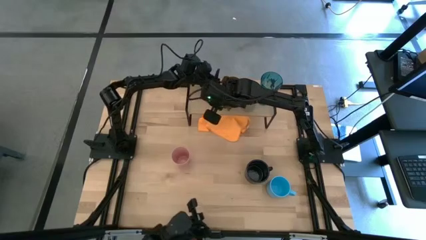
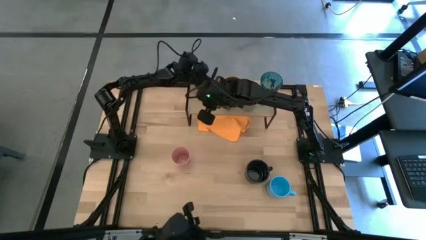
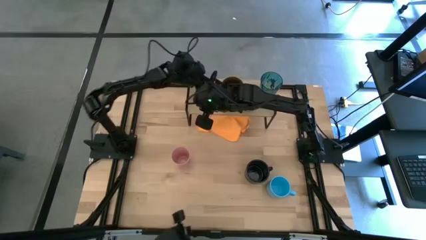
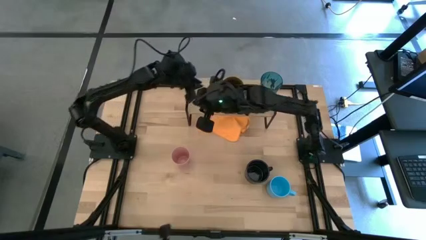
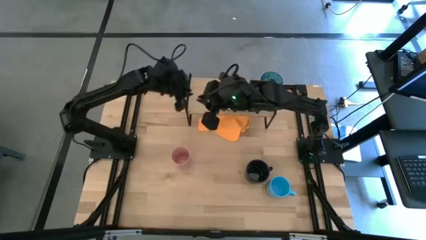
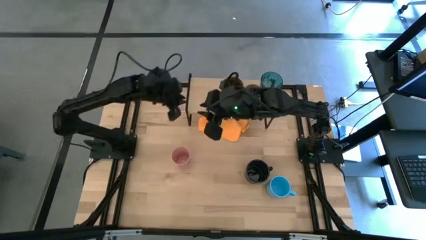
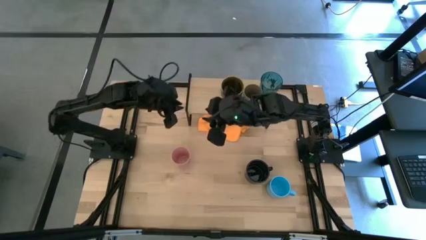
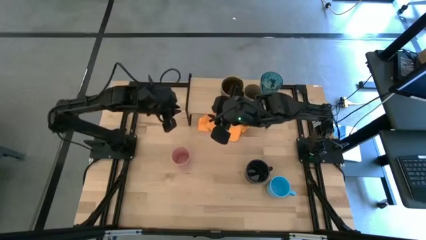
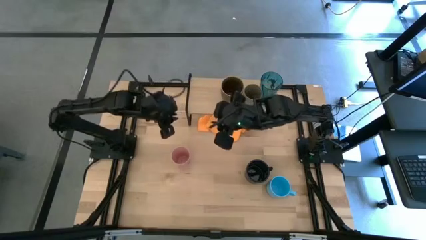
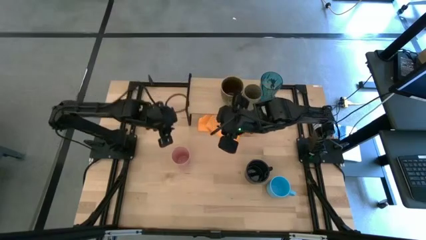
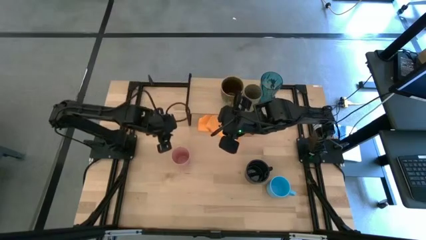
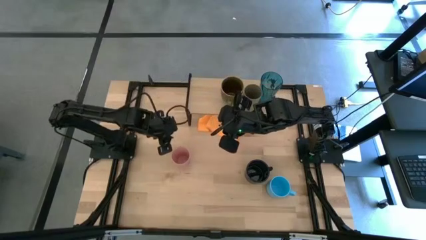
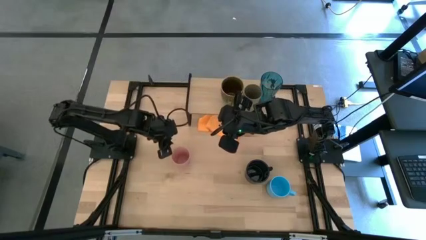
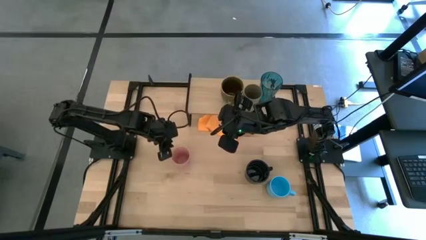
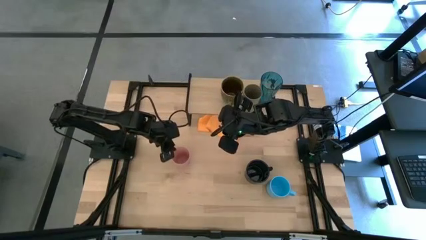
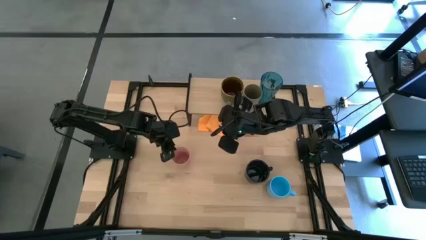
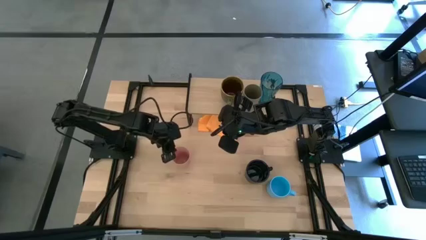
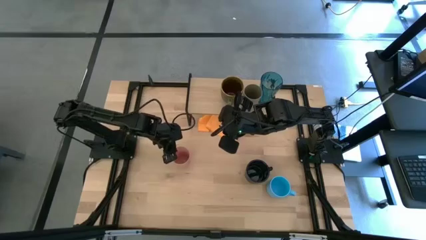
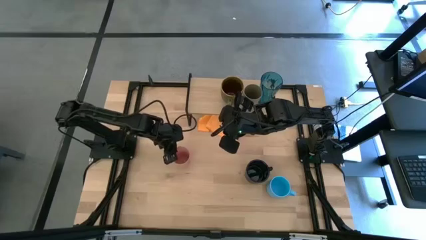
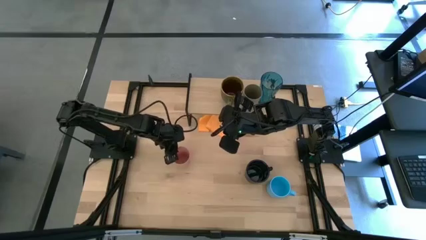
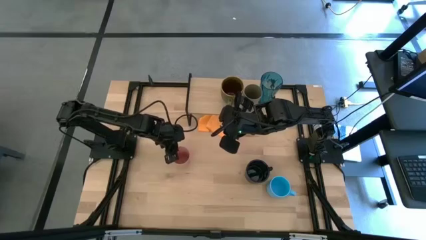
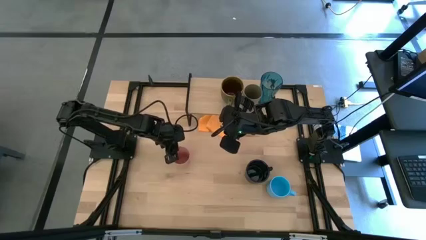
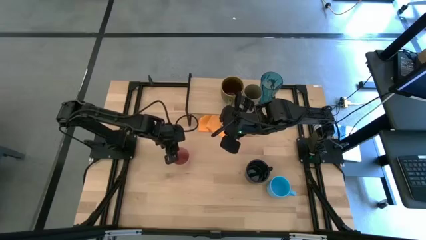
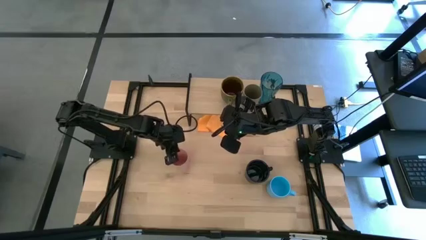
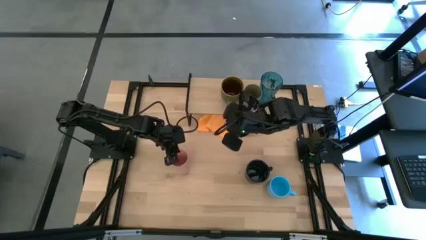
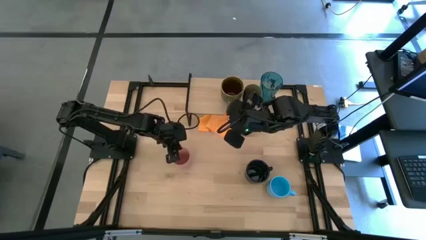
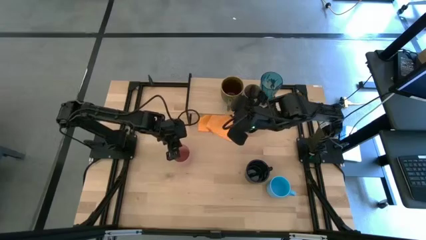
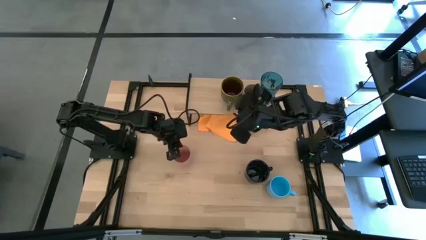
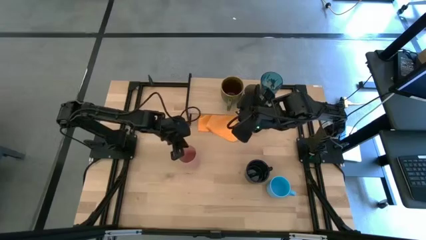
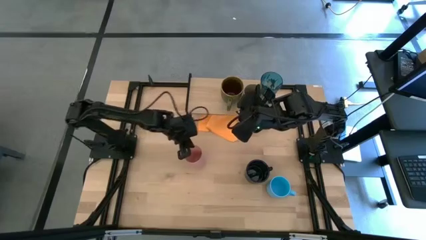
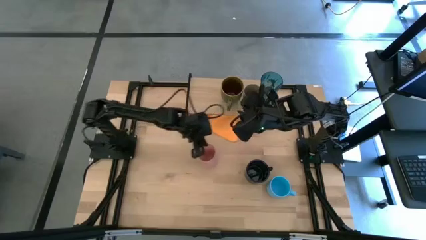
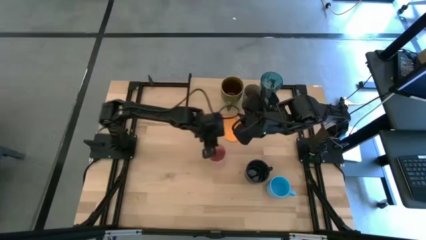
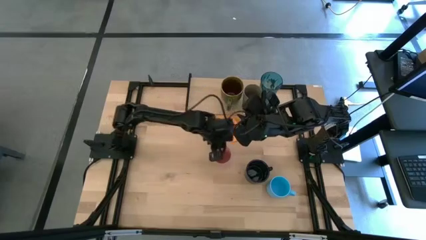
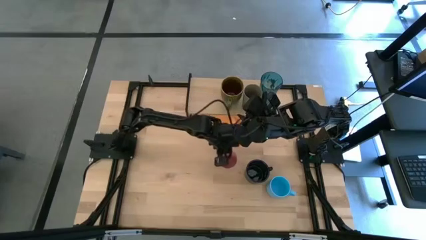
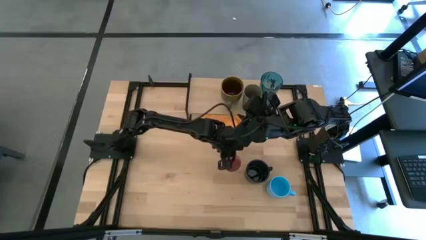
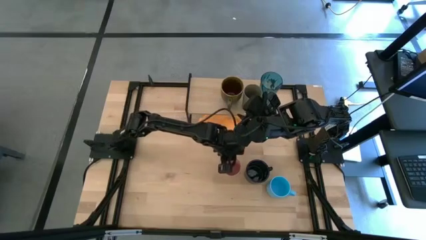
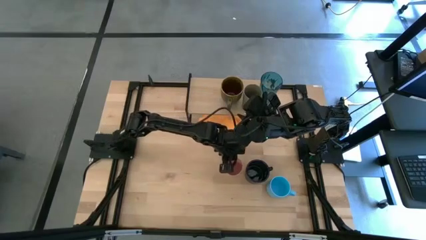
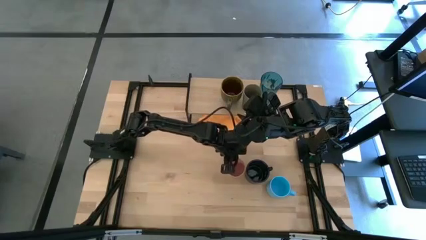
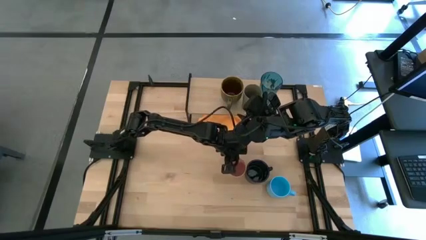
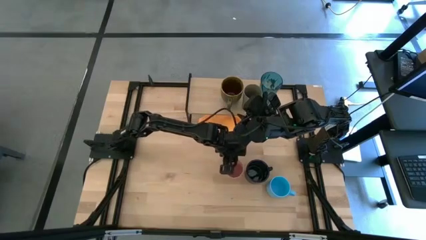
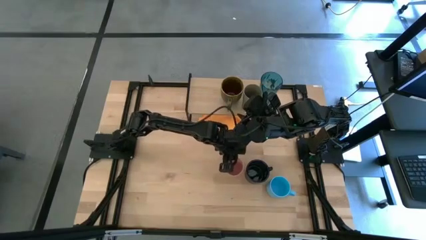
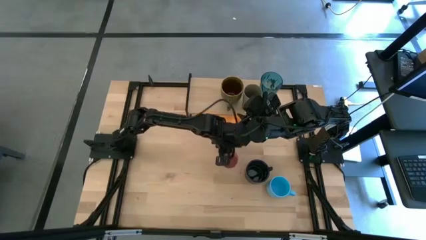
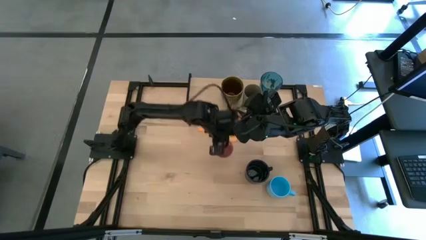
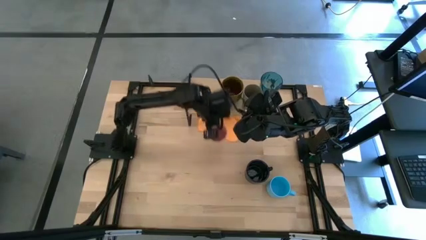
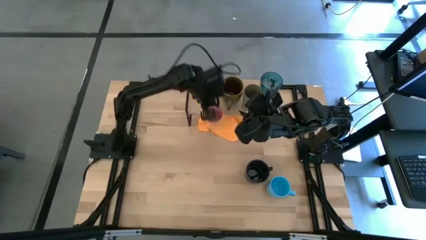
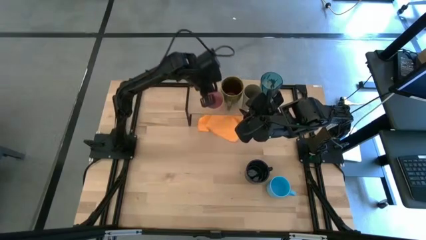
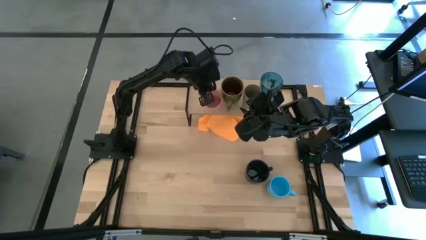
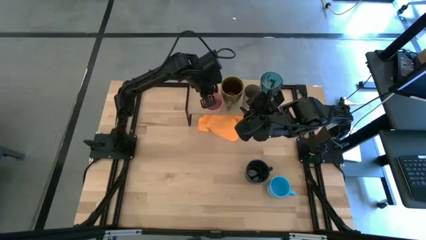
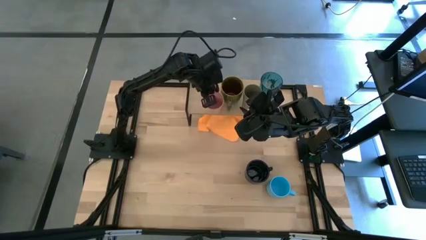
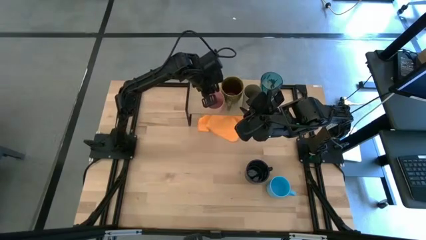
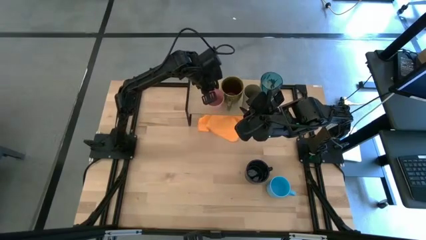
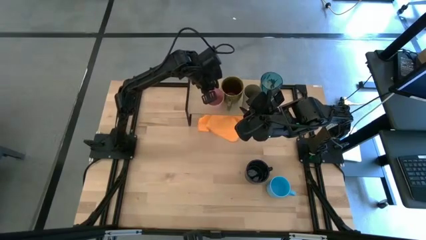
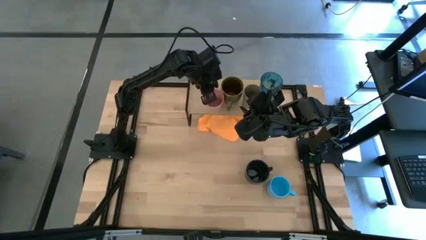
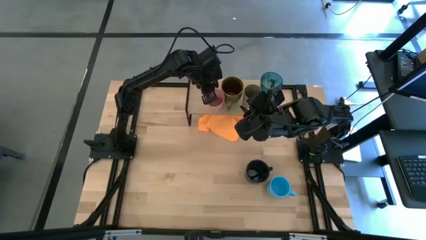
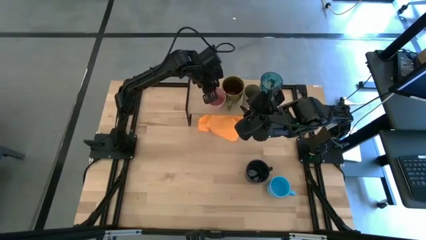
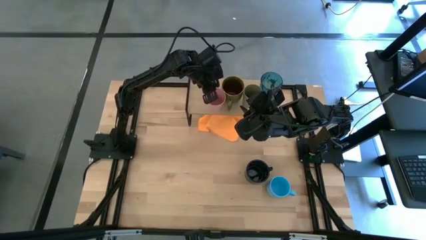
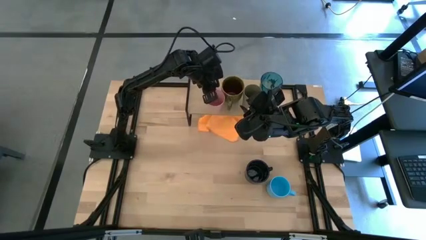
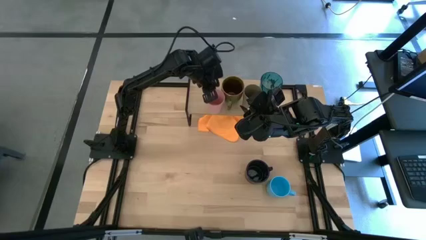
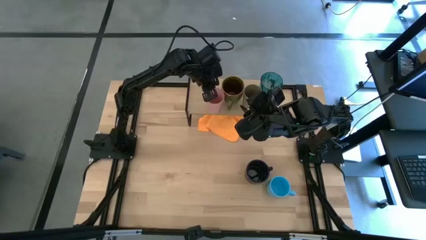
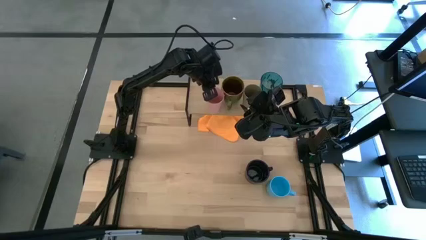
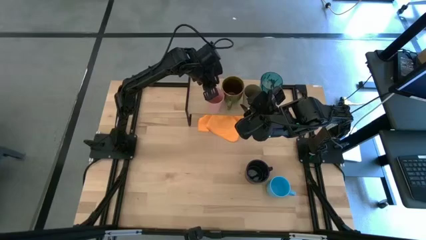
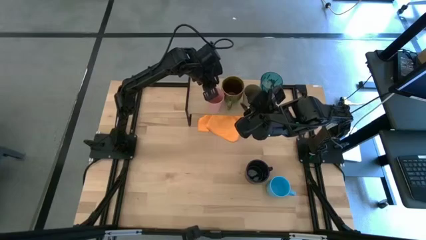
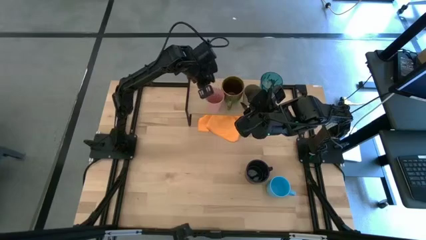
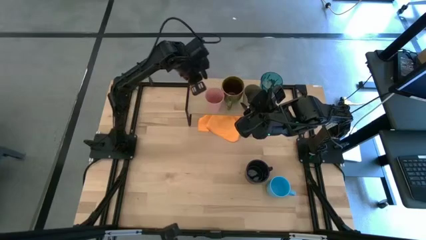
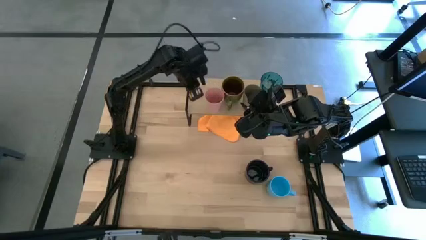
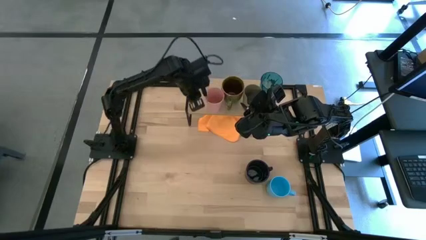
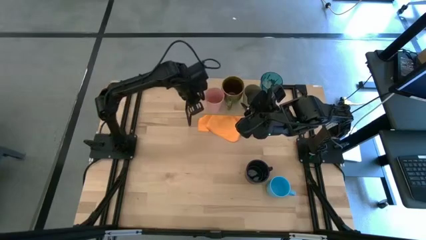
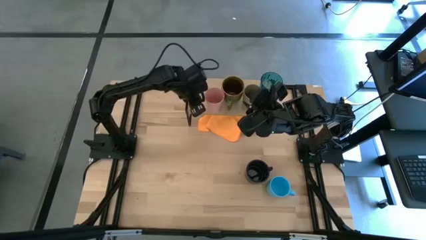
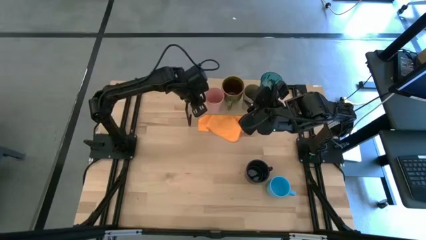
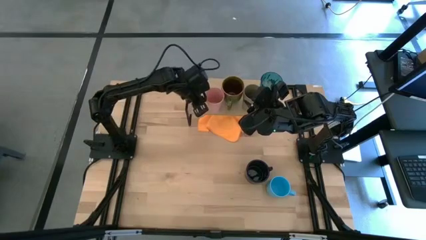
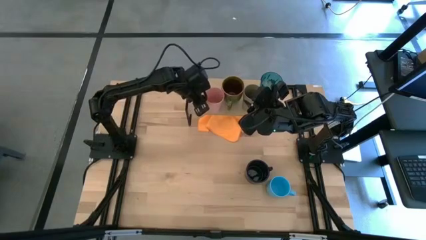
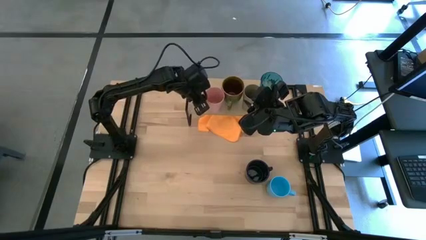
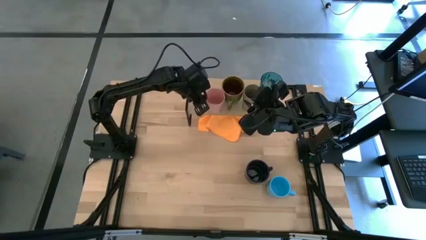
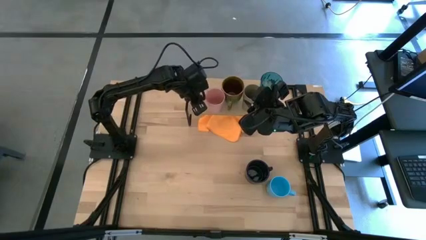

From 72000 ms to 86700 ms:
Task: Stack small to large cups/mugs on shelf
Put the pink cup on the shelf

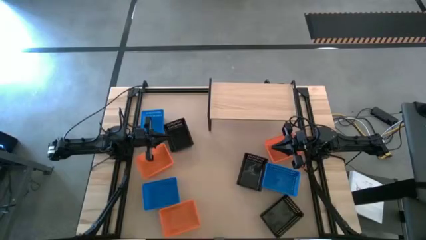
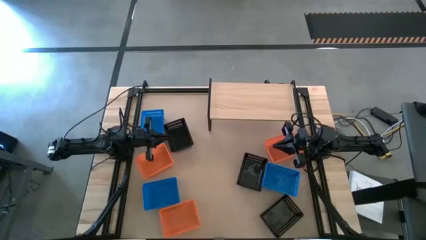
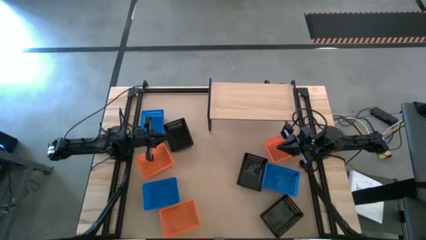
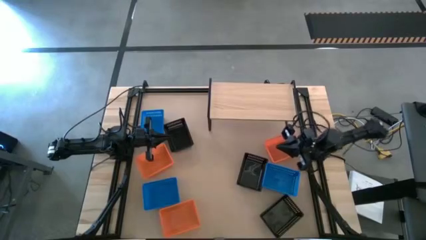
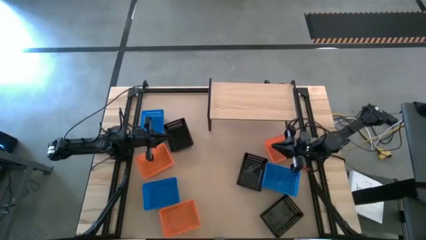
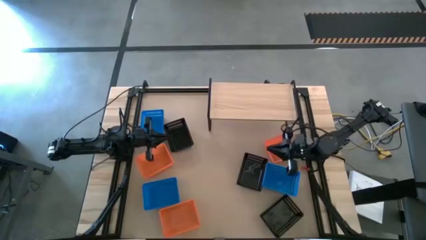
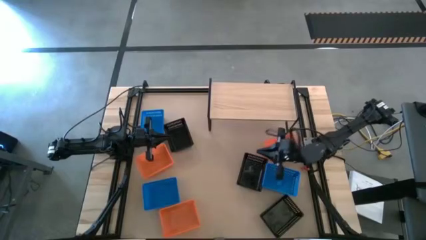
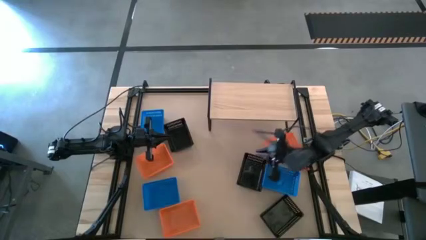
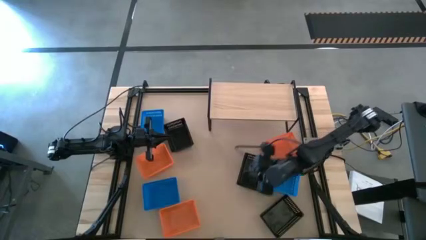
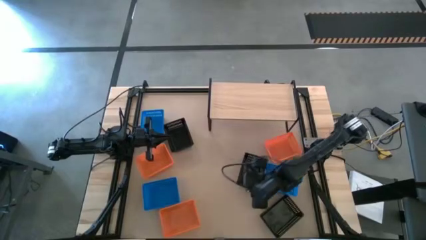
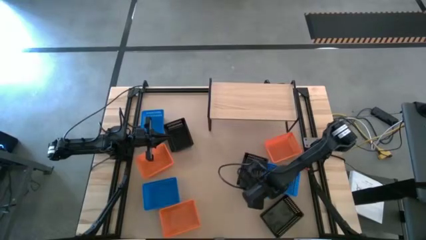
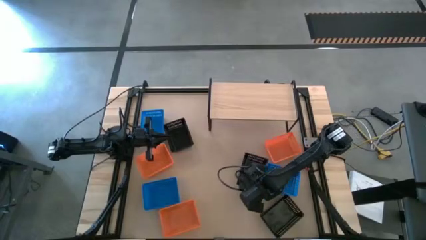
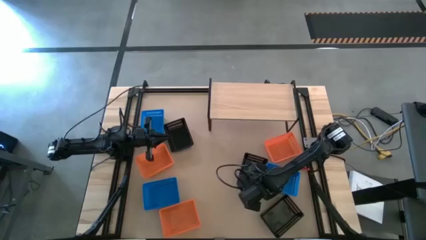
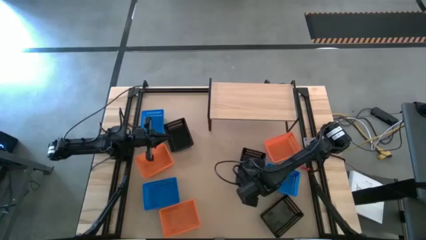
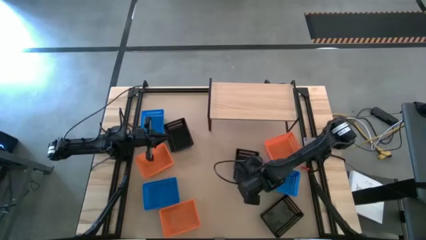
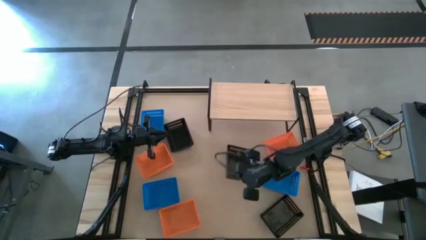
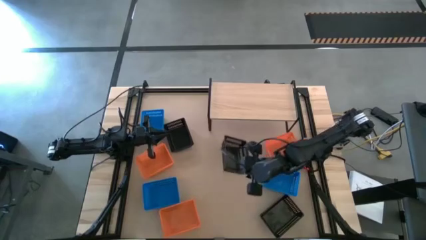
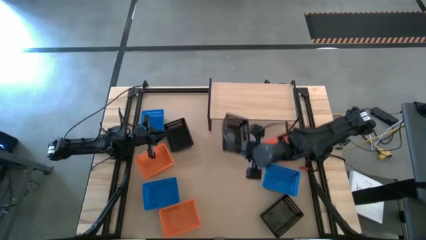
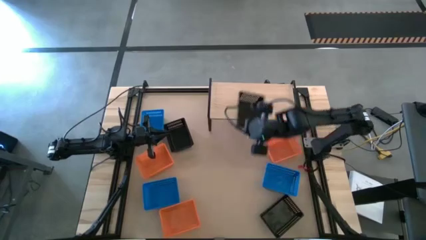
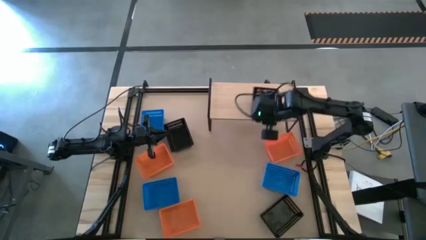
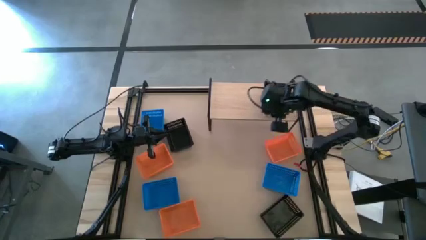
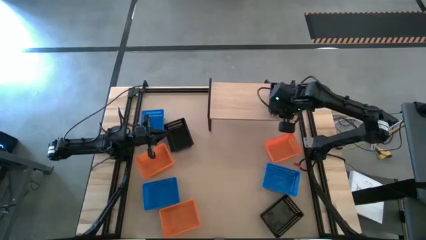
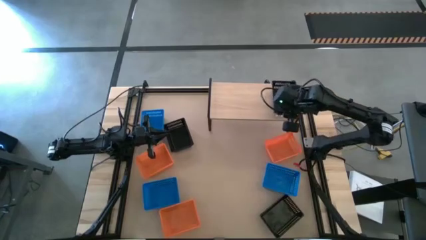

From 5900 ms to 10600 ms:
Task: Stack baskets on shelf by color
Put the middle black bin on the shelf
